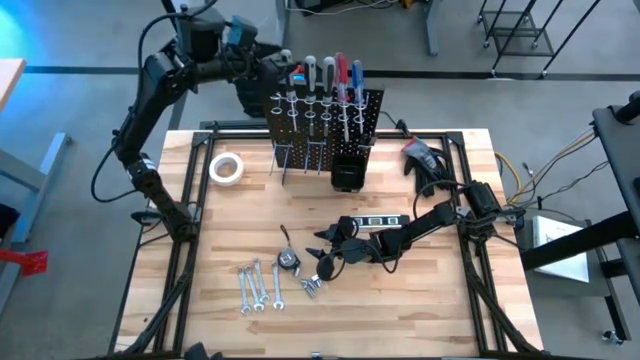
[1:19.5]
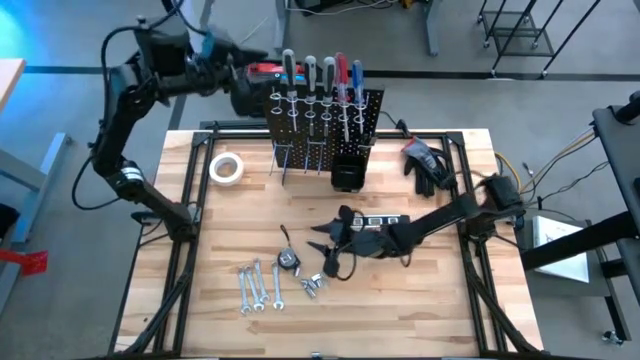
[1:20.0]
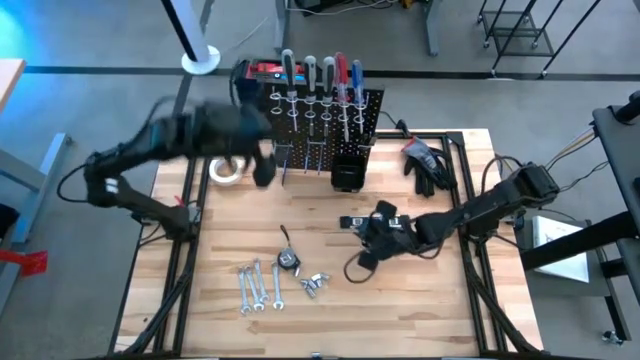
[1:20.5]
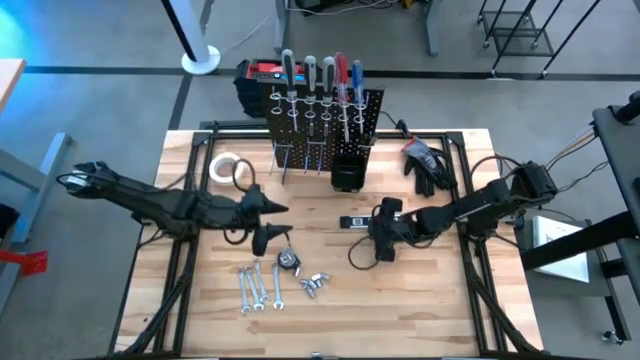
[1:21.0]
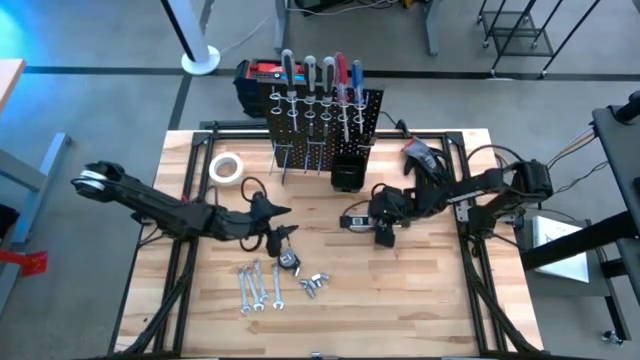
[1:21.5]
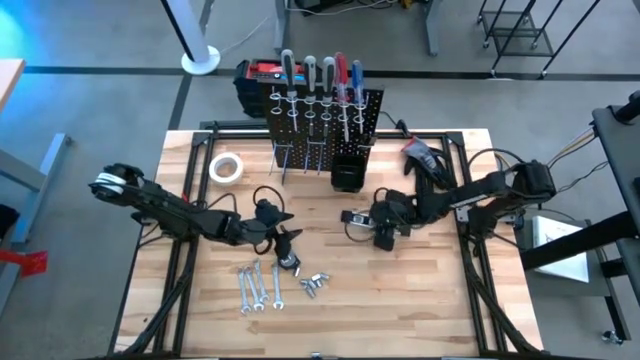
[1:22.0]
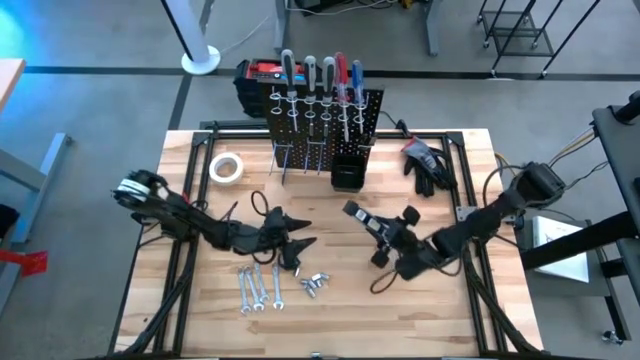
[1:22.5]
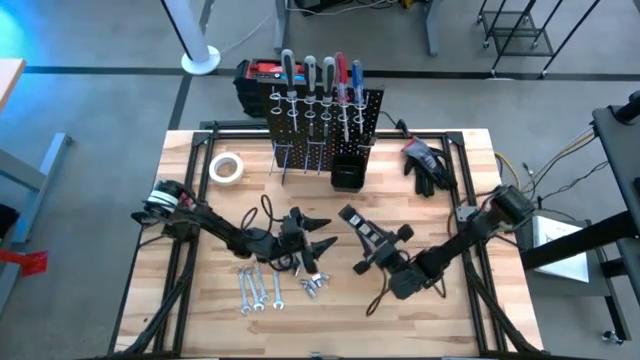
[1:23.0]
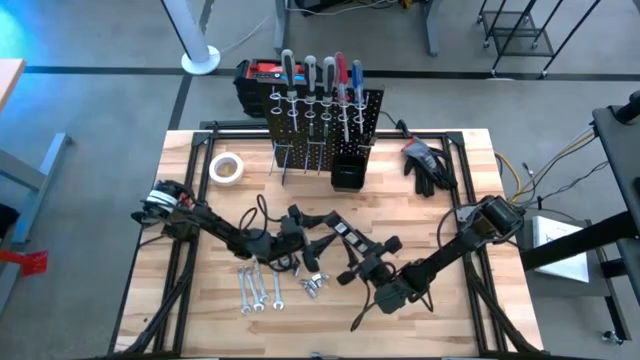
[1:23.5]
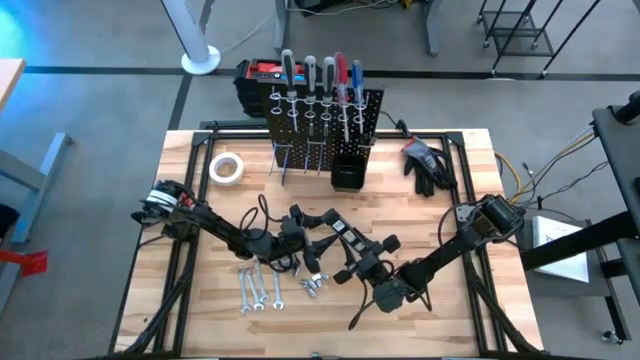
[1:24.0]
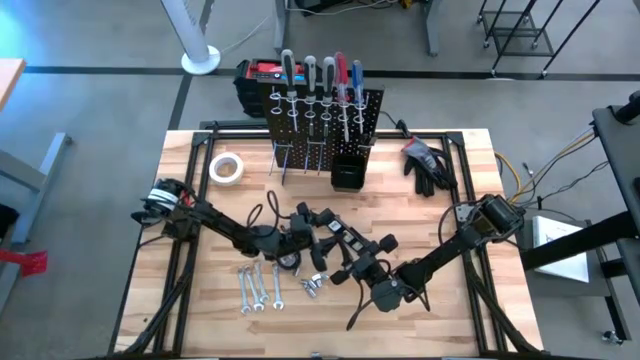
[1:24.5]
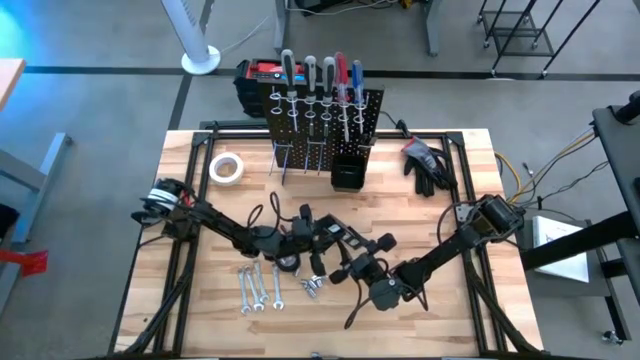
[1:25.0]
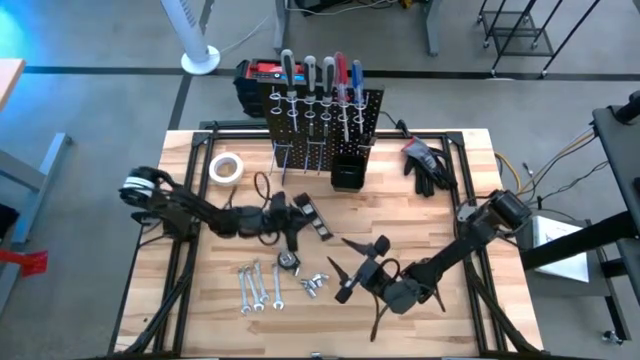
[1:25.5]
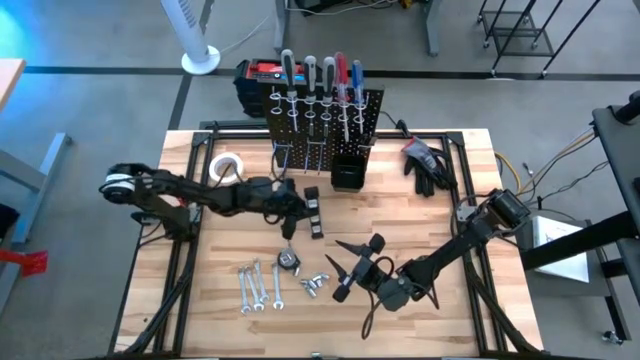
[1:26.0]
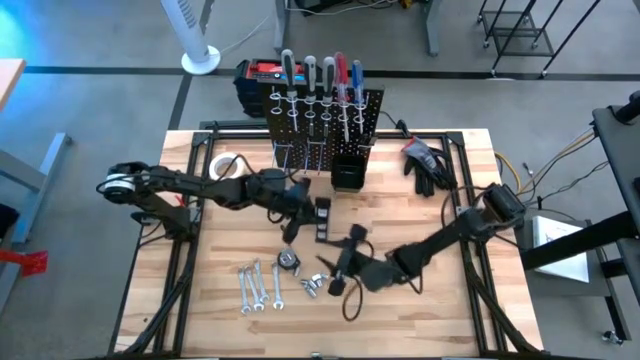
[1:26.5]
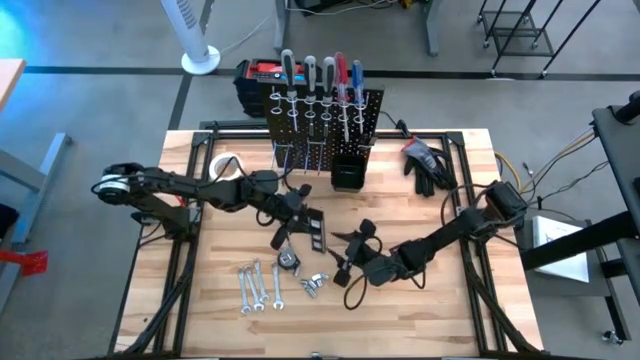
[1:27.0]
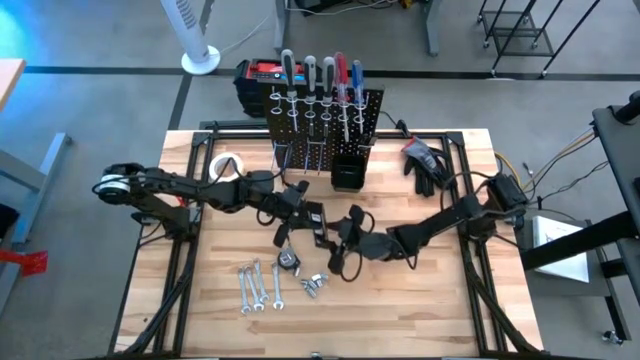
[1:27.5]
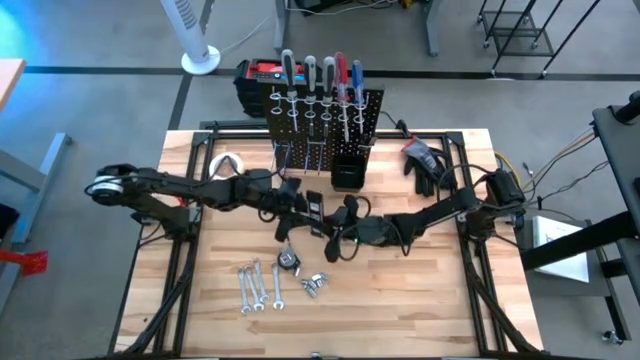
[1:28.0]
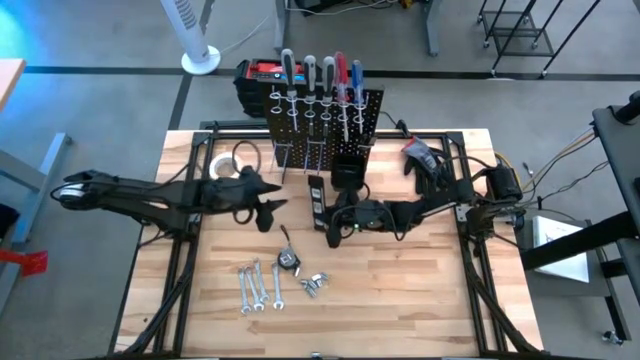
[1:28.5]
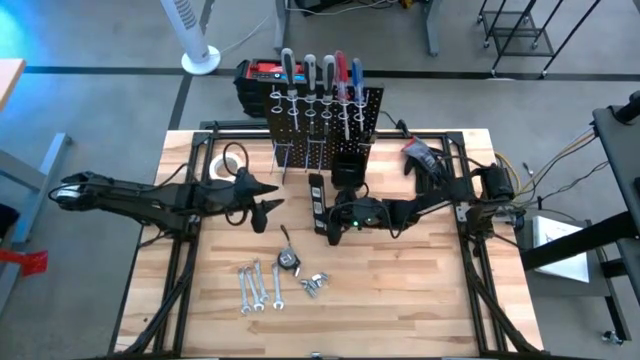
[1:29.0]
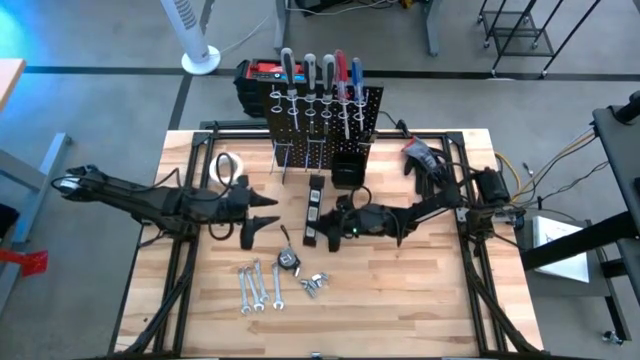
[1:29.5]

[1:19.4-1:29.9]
Task: Hang tools onto peg board
Hang the spirit level on the peg board

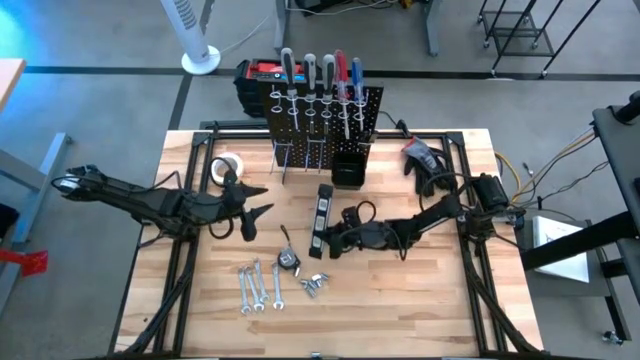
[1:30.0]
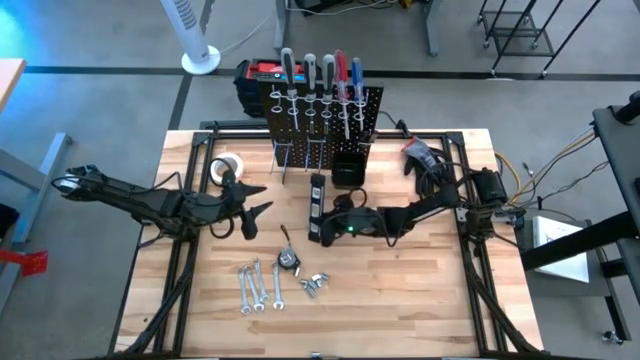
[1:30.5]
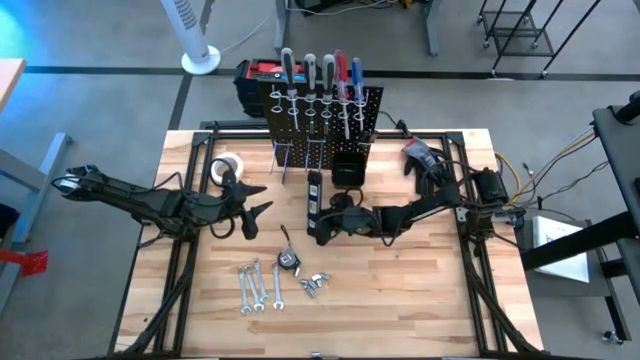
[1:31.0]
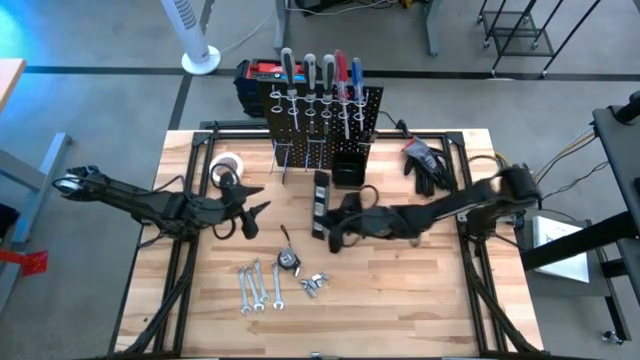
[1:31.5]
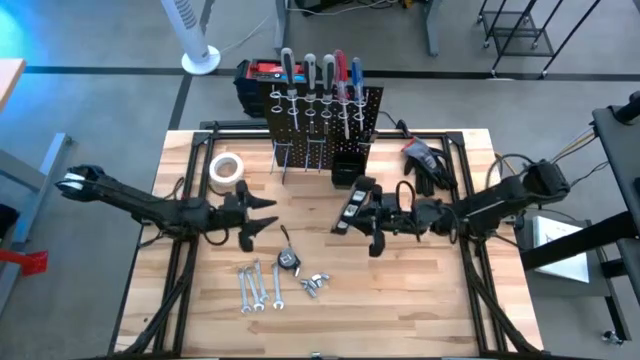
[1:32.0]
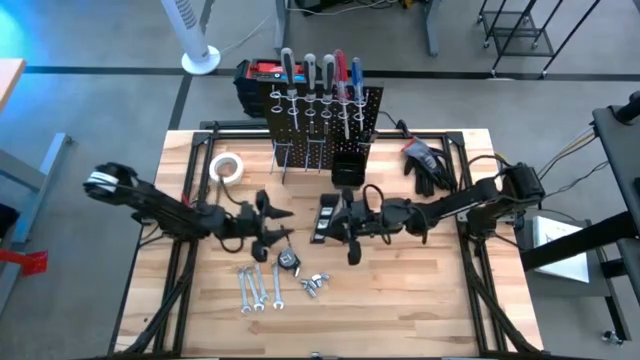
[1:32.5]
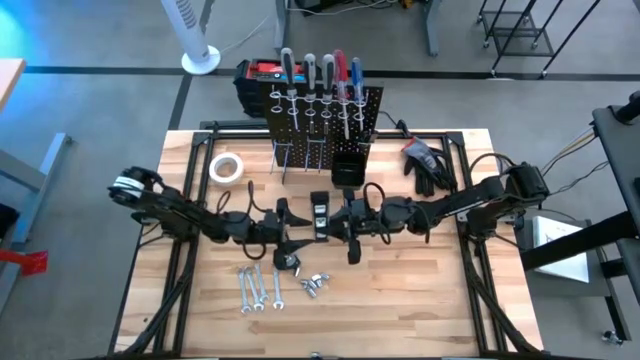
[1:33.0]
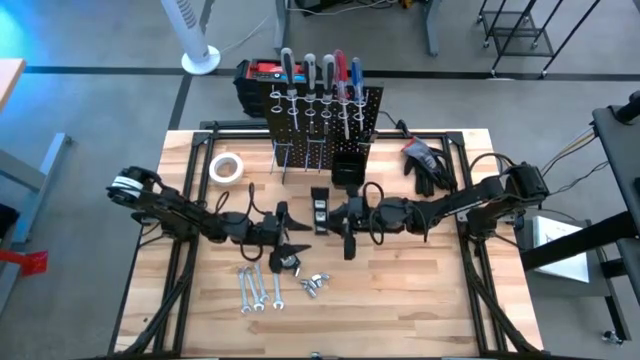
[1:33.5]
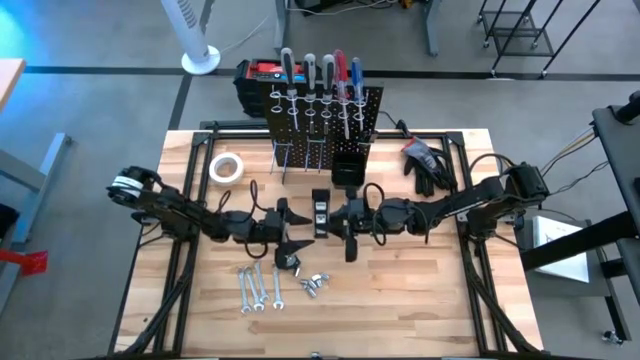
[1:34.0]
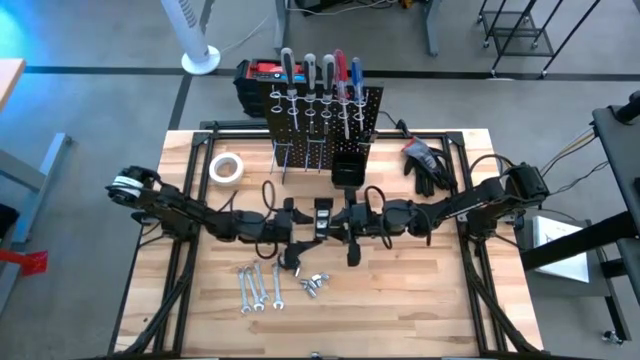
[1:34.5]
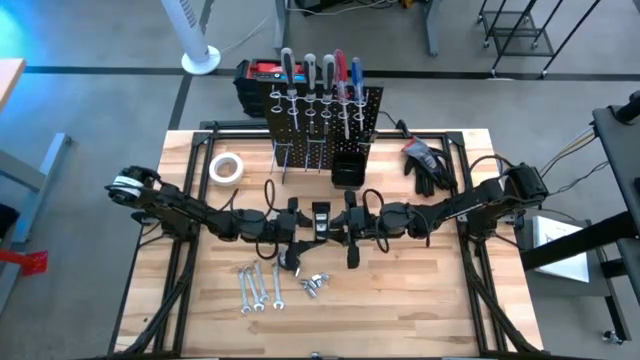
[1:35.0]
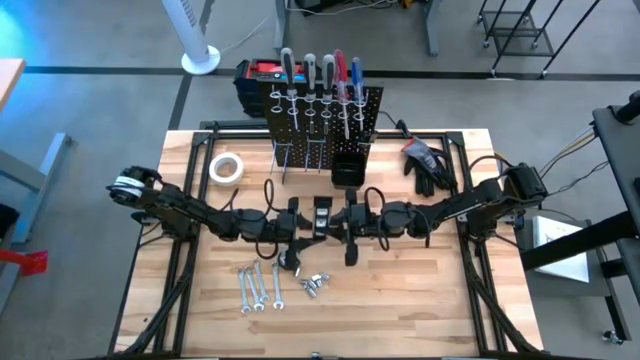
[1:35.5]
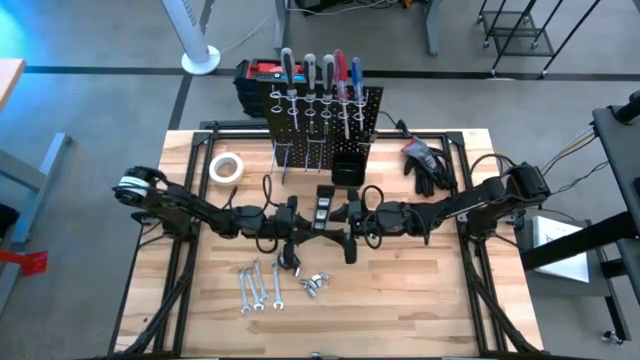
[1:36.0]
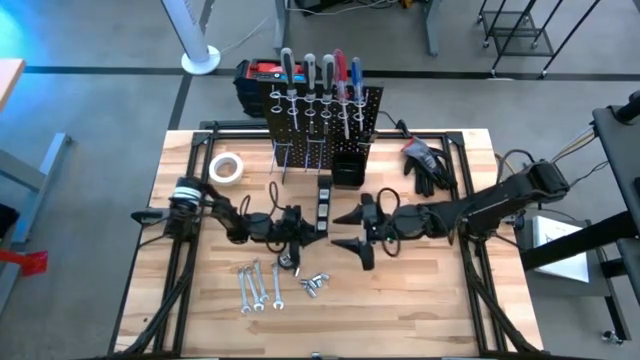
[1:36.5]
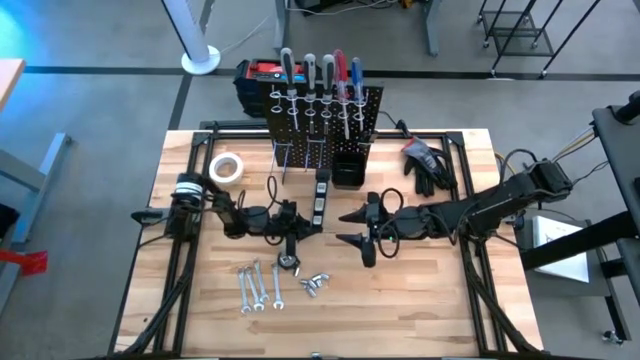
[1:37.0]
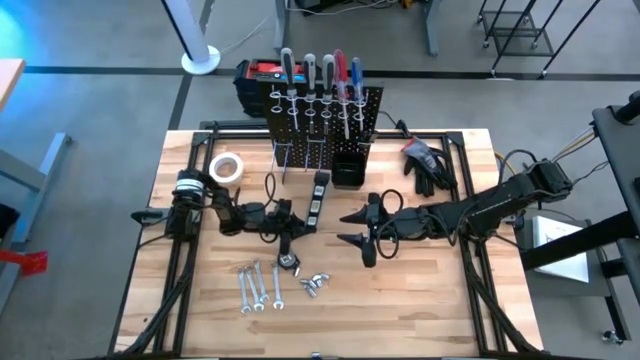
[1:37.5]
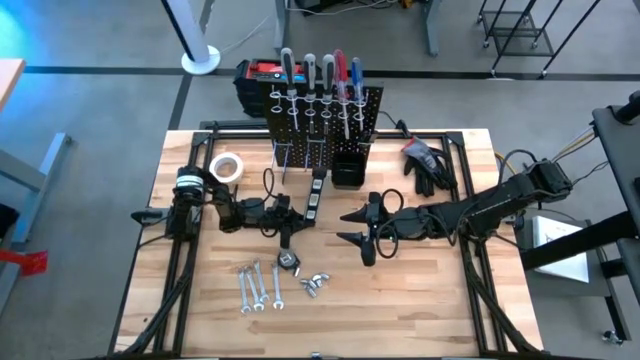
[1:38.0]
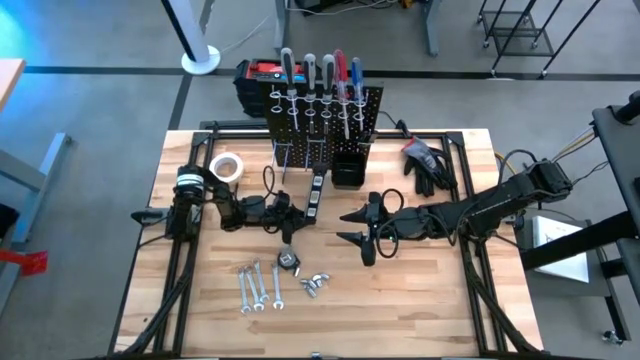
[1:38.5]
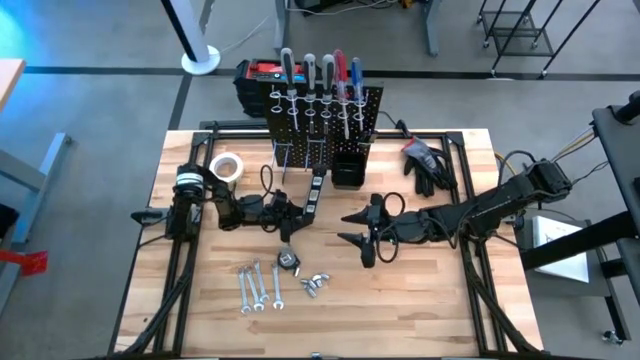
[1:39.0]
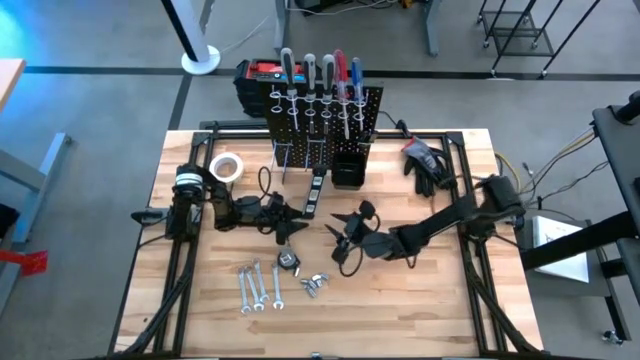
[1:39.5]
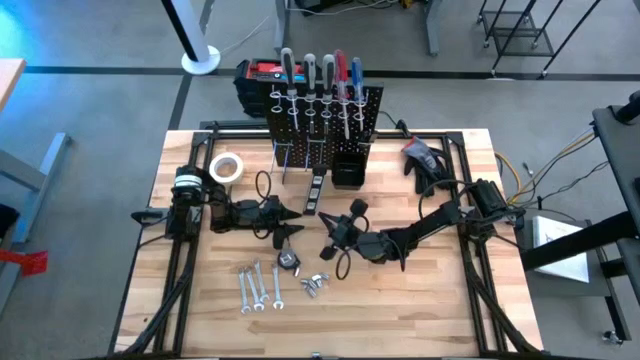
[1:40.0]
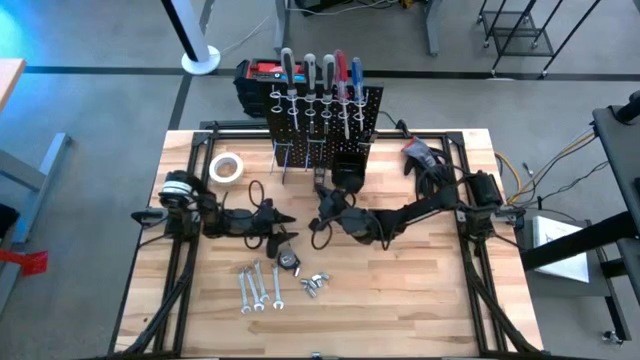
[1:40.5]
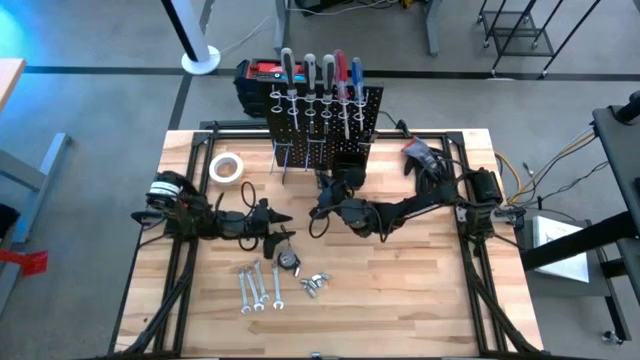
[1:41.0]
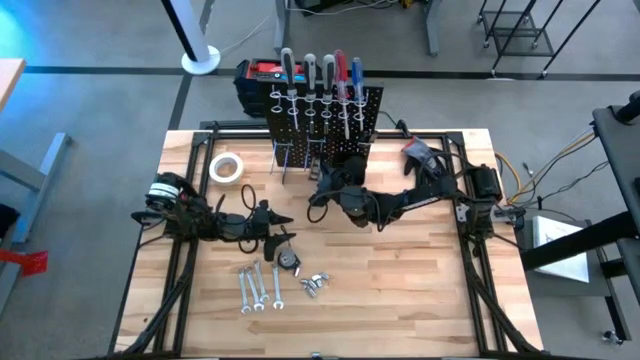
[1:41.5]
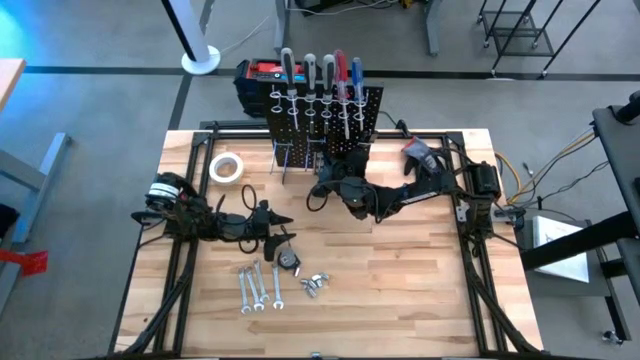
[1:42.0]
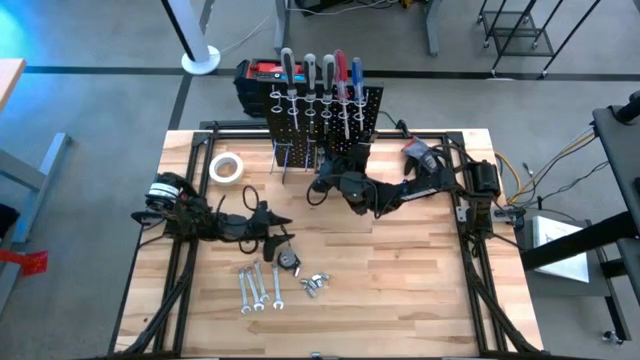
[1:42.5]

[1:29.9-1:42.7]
Hang the spirit level on the peg board
